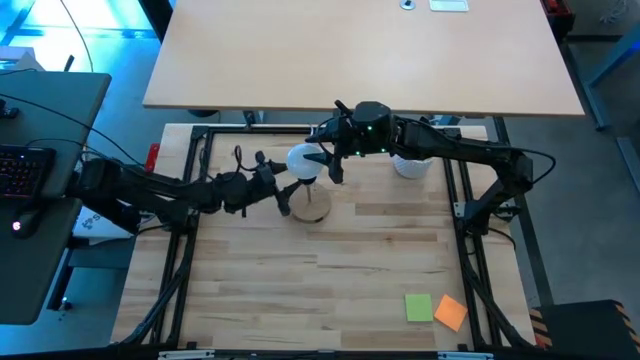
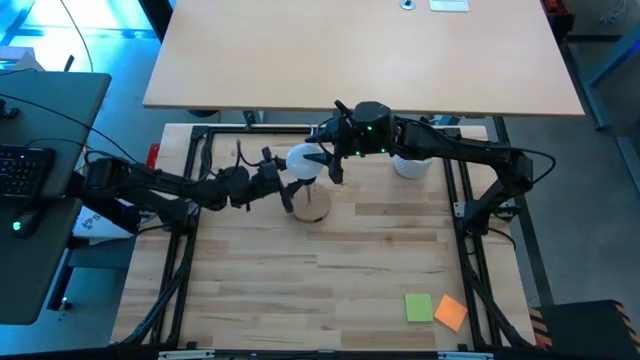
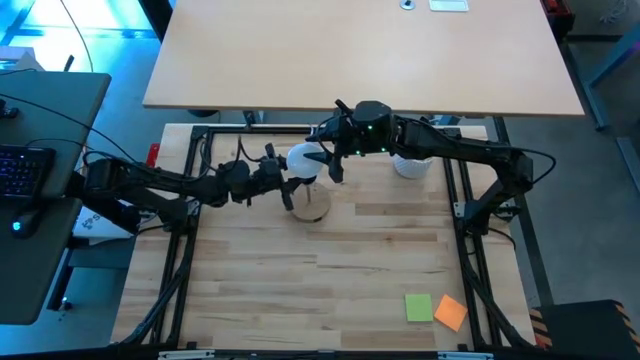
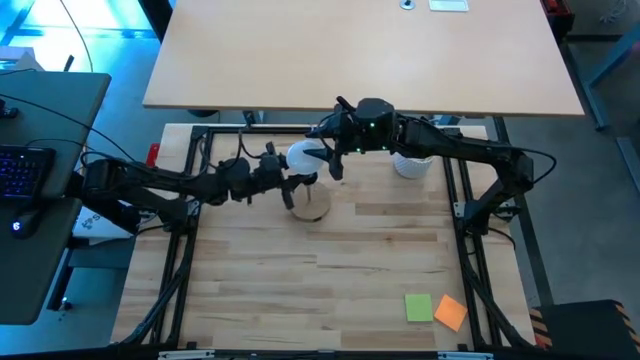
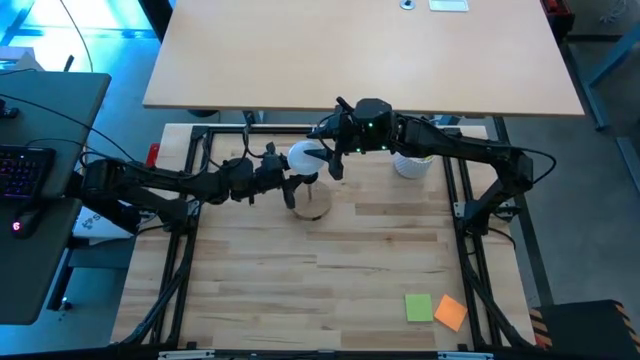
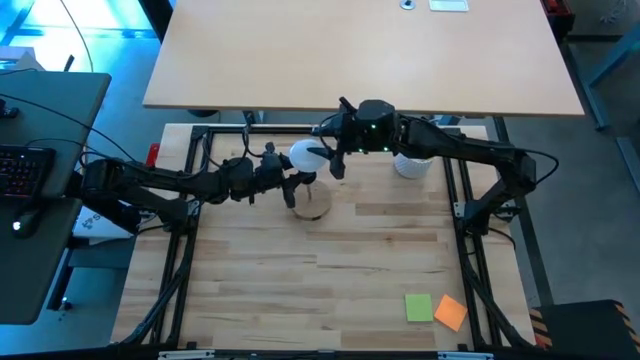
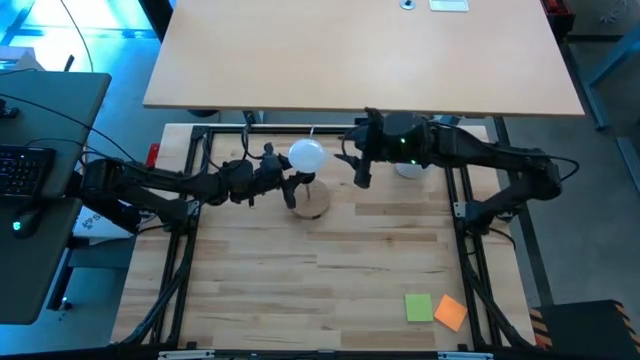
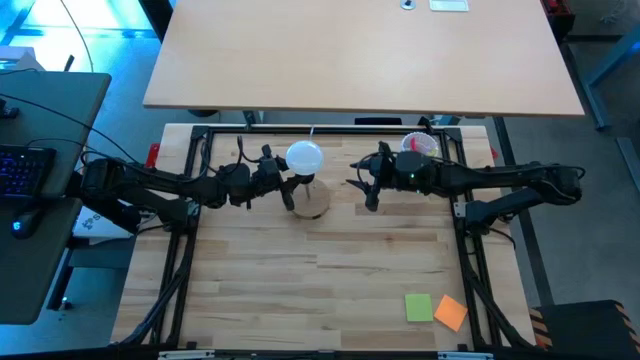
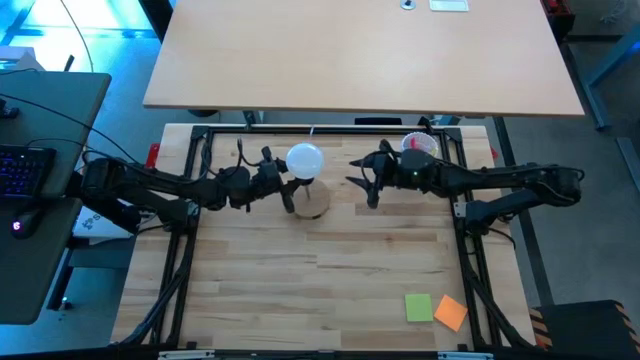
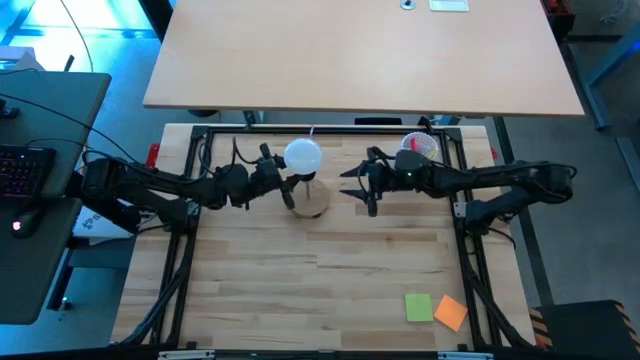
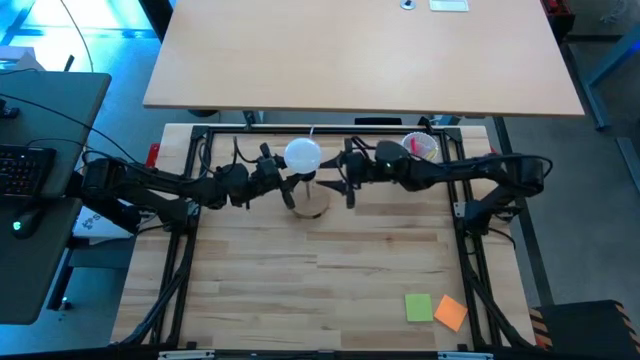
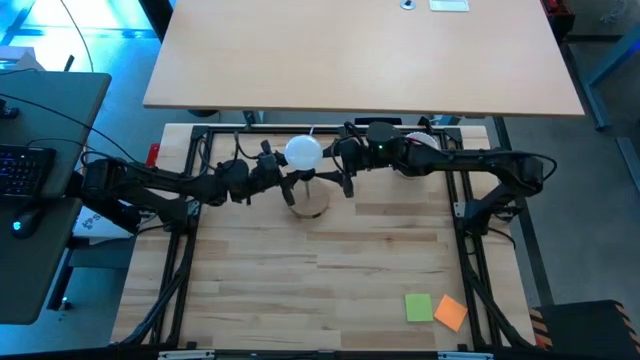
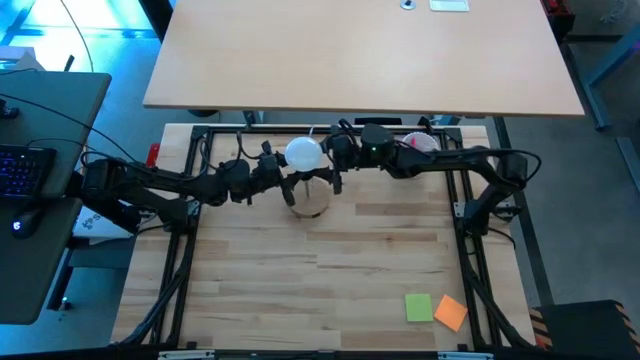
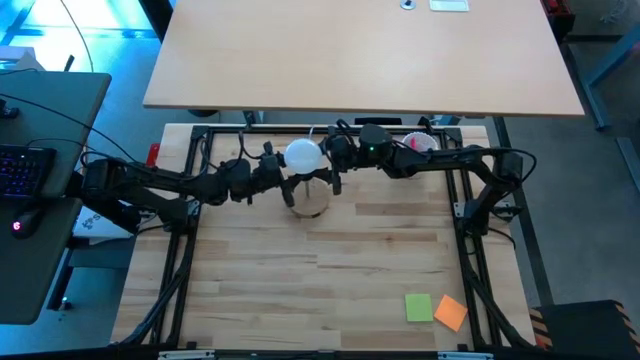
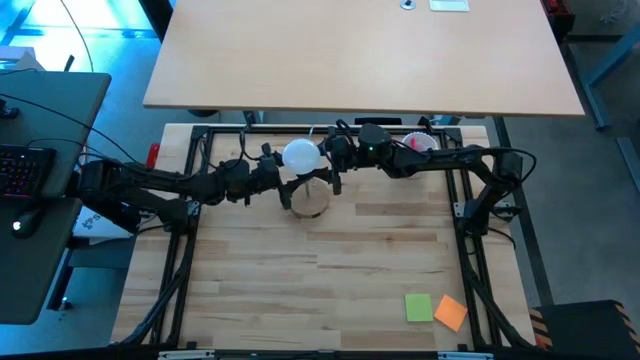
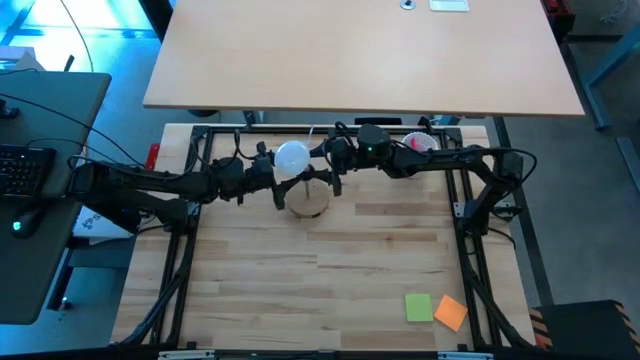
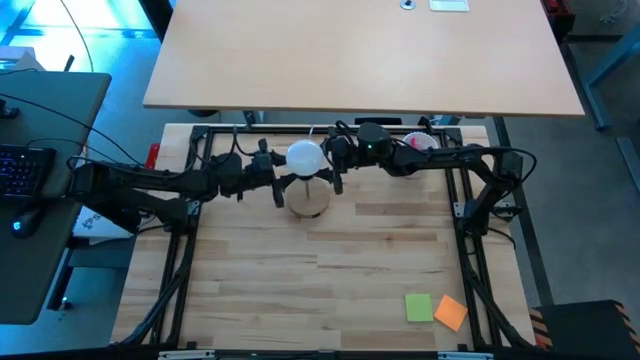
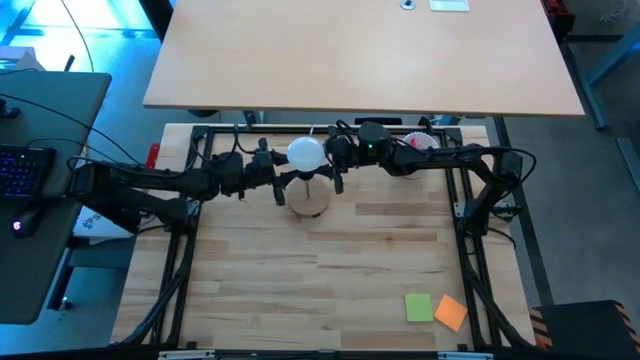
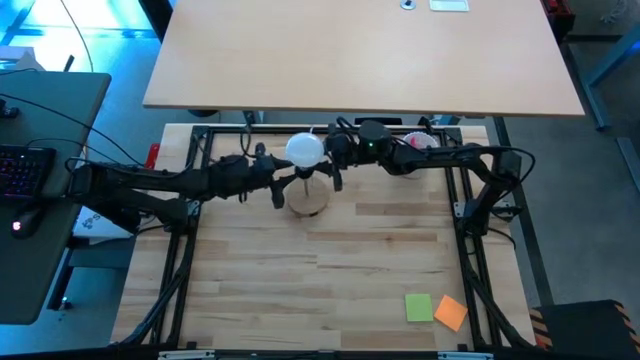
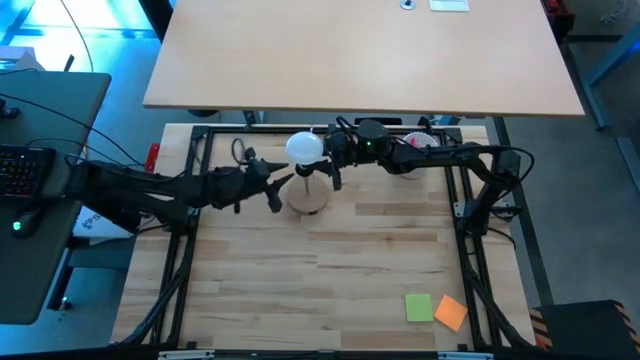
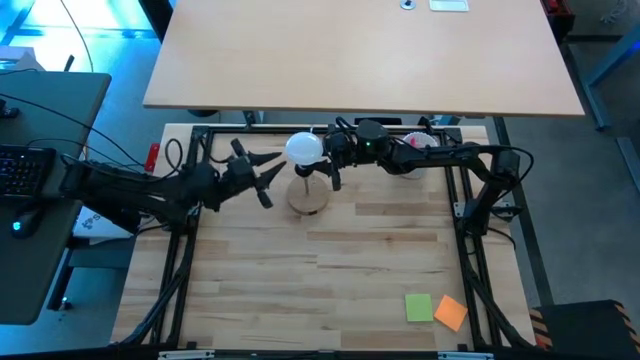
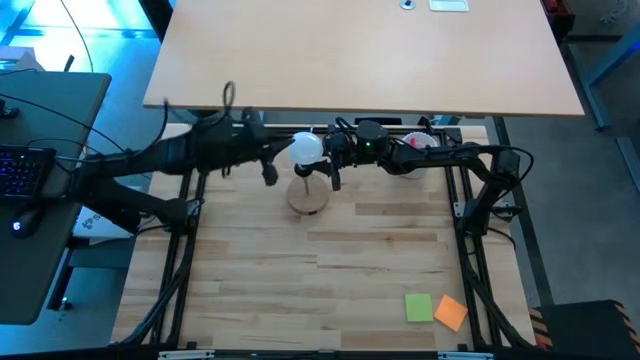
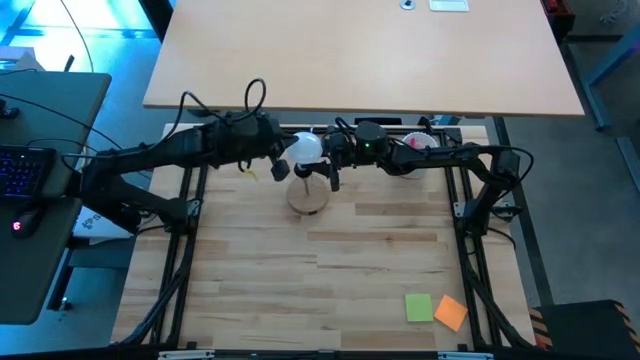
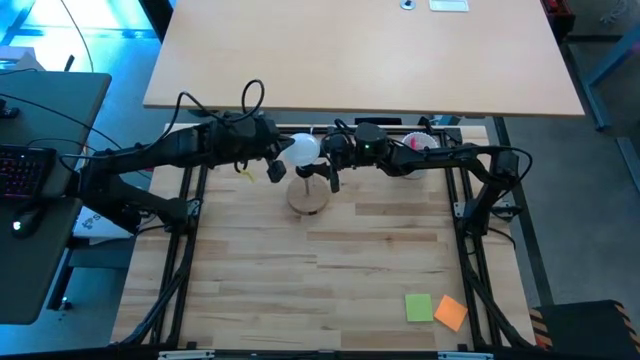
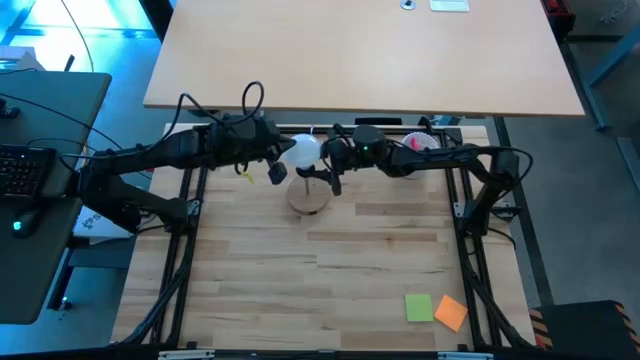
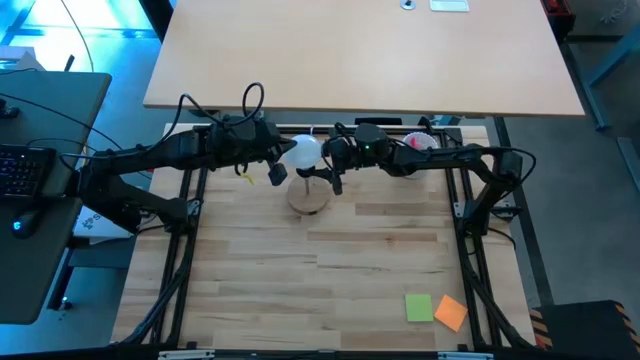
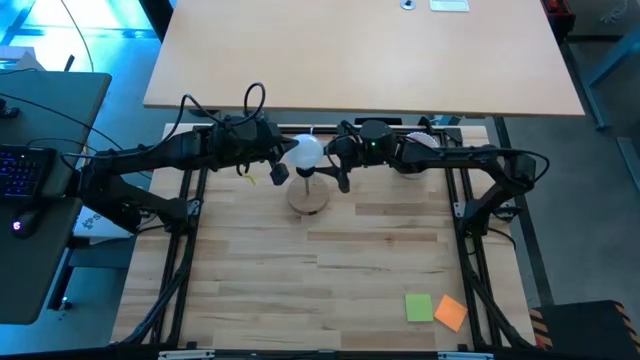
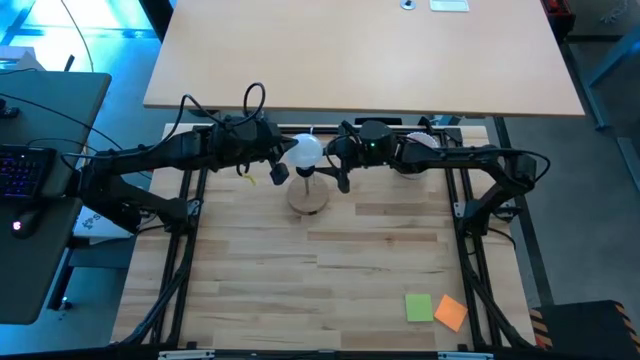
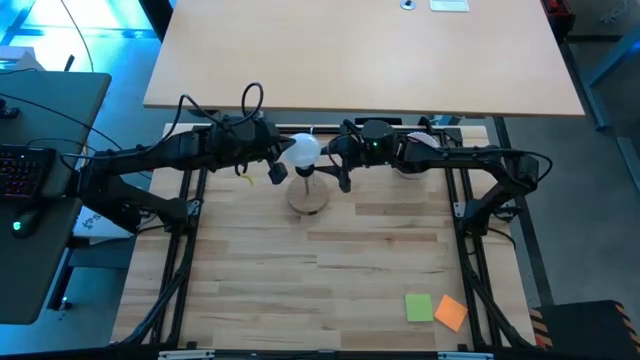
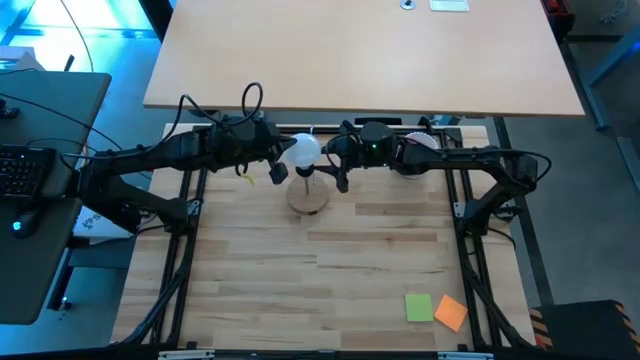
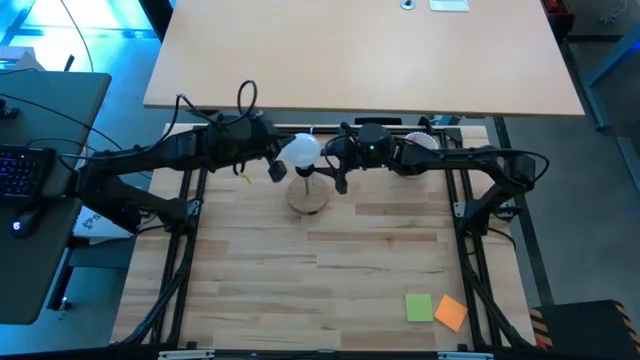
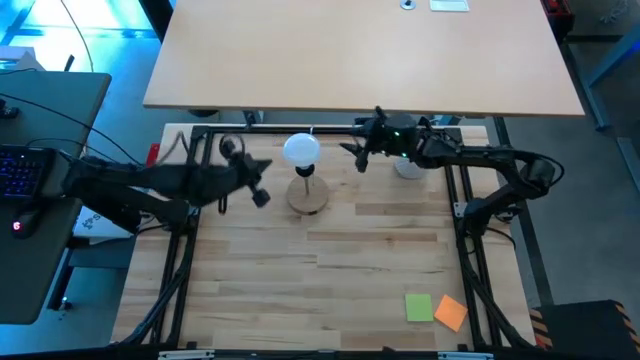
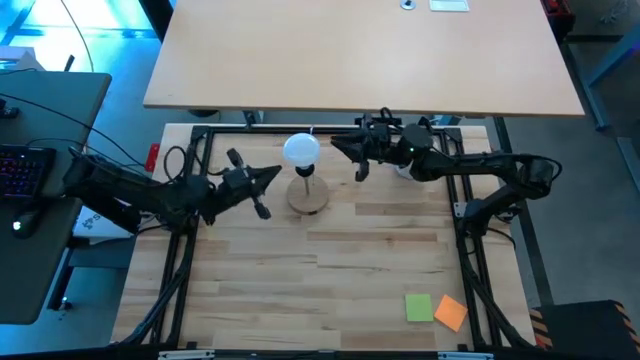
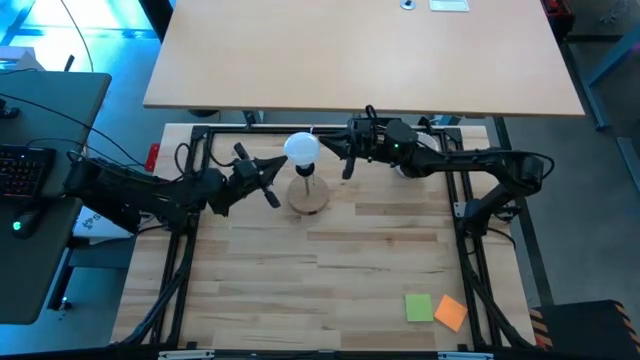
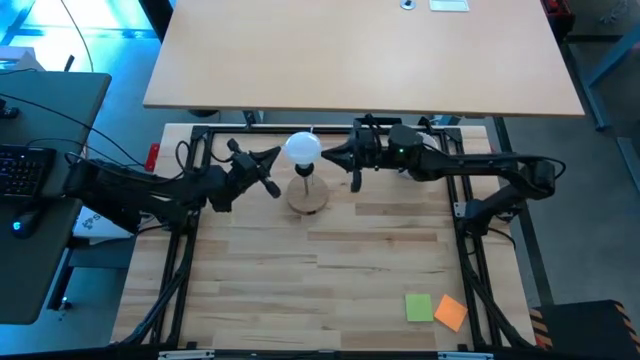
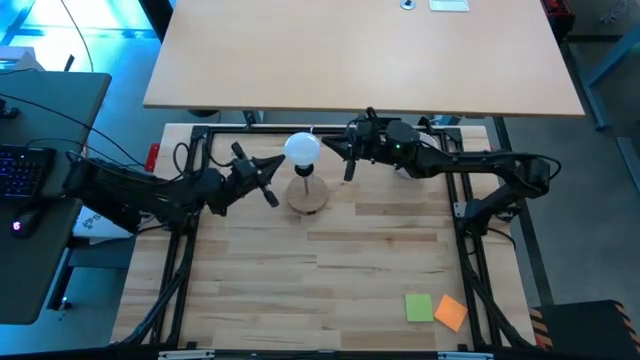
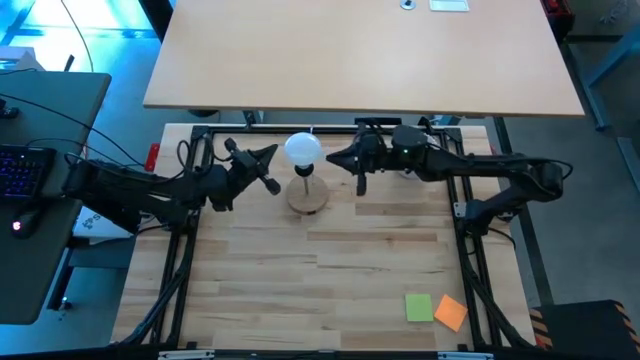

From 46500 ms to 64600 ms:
Task: Screw lightbulb
Insert the lightbulb into the brown lamp

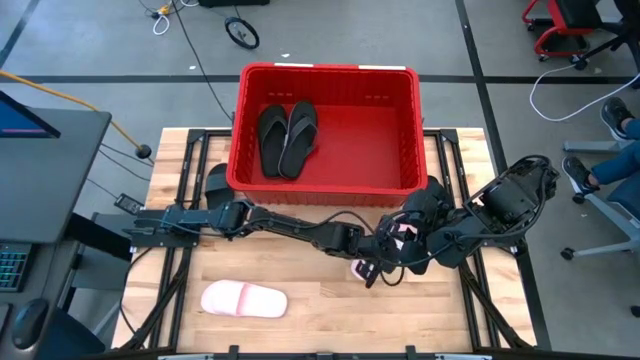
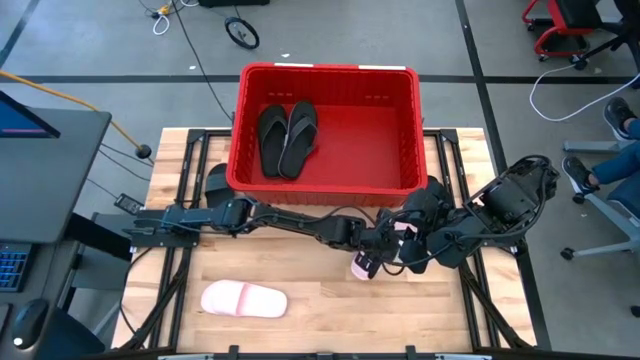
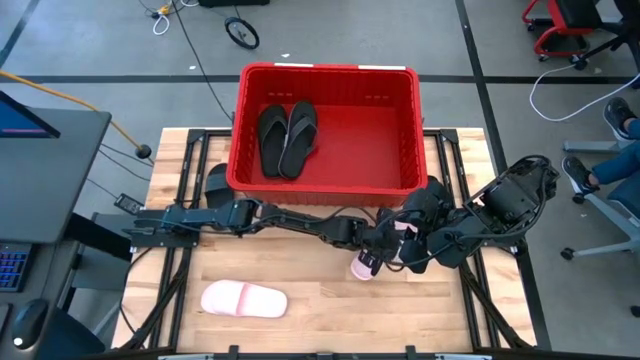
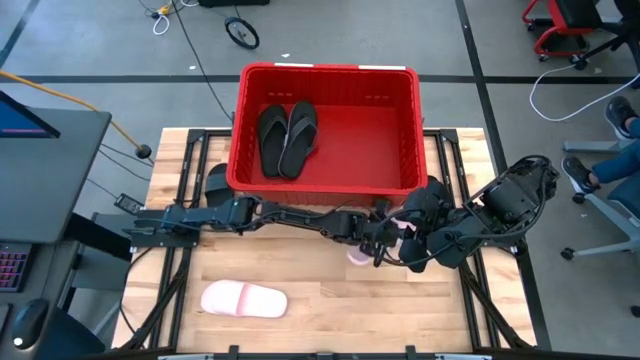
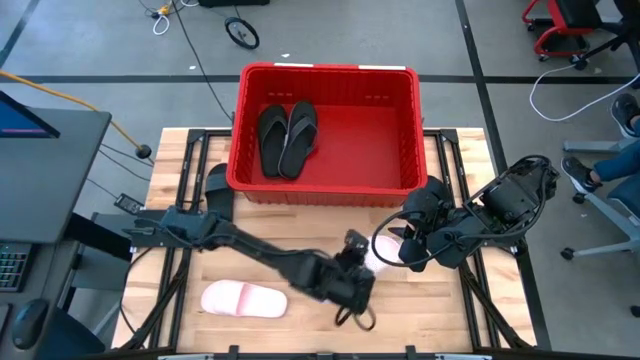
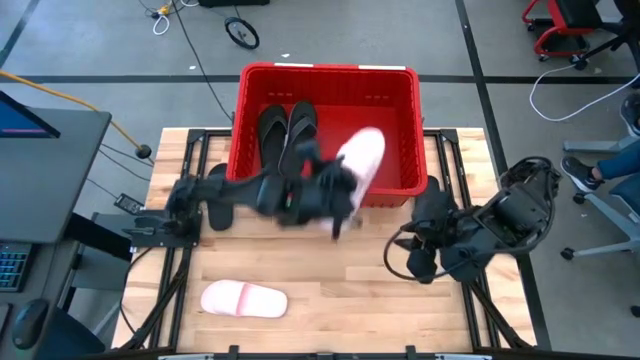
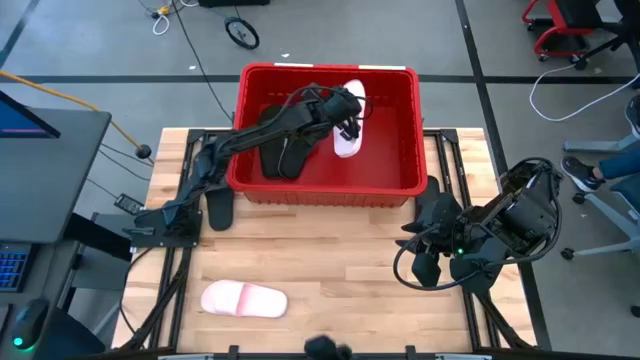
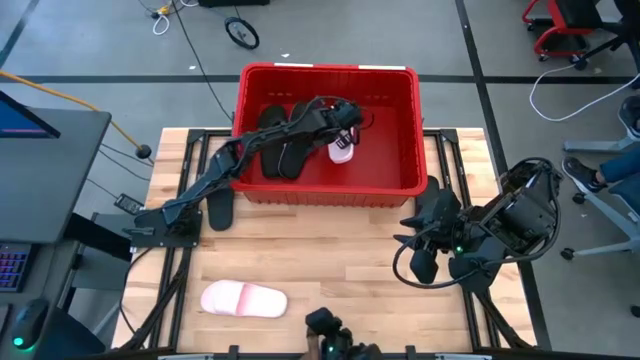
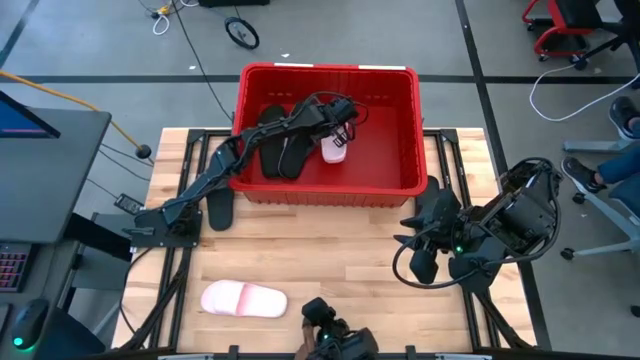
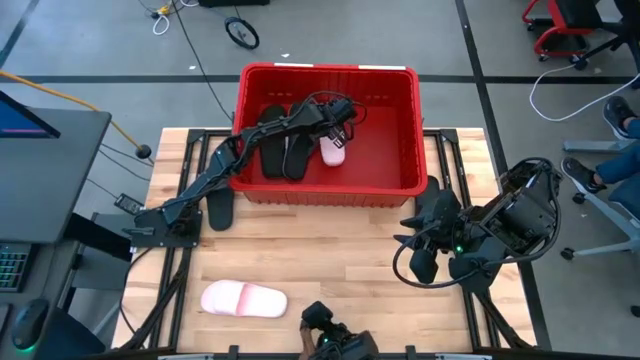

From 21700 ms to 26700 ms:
Task: Pick and place slides into bin
Put the pink slipper into the red bin
